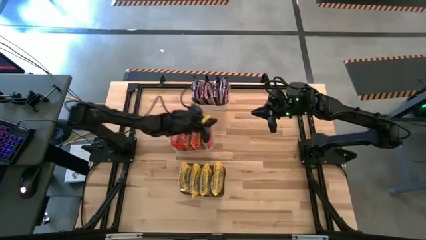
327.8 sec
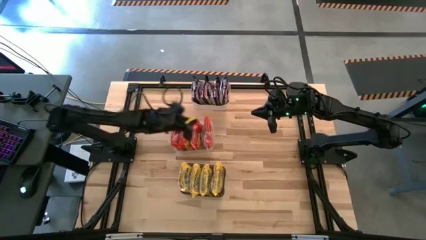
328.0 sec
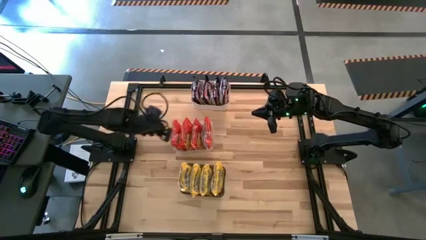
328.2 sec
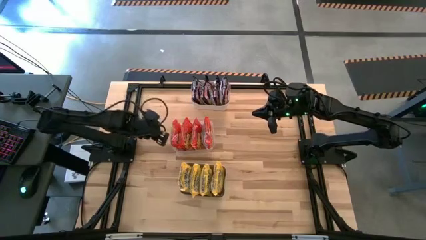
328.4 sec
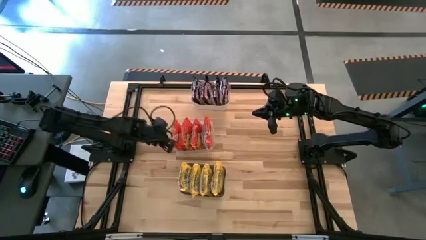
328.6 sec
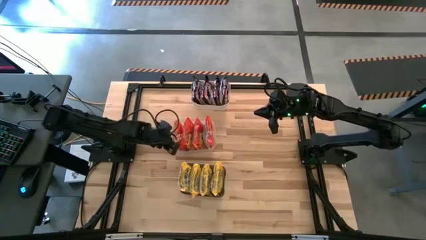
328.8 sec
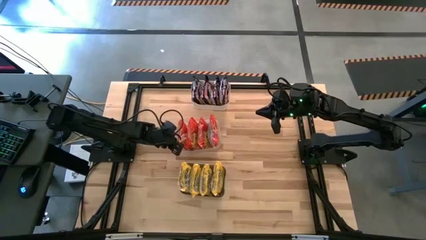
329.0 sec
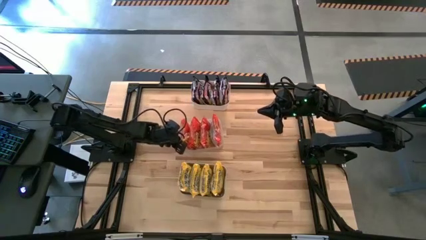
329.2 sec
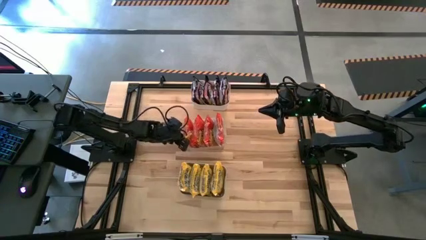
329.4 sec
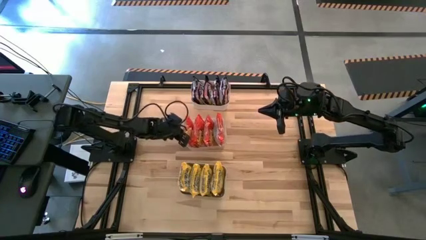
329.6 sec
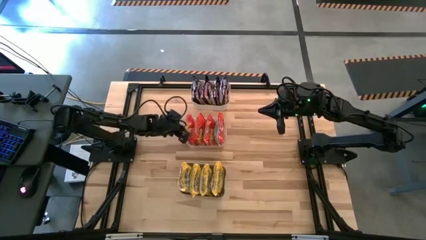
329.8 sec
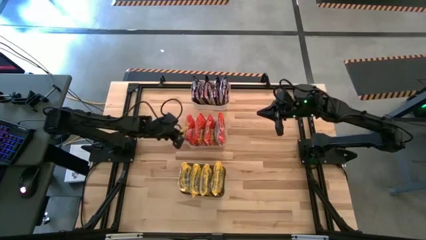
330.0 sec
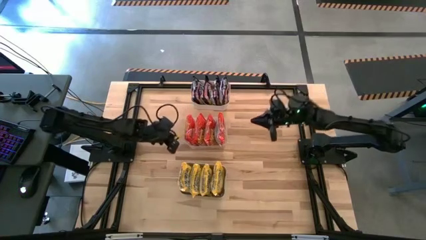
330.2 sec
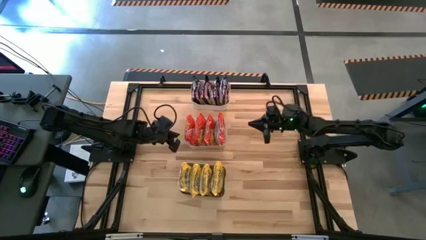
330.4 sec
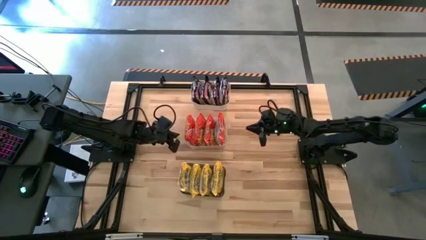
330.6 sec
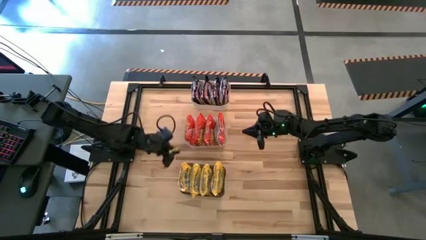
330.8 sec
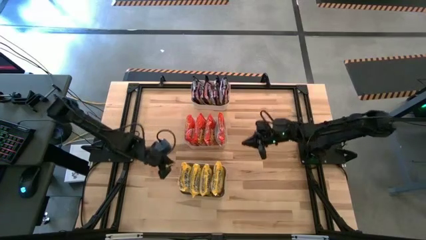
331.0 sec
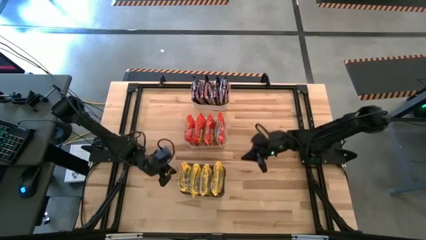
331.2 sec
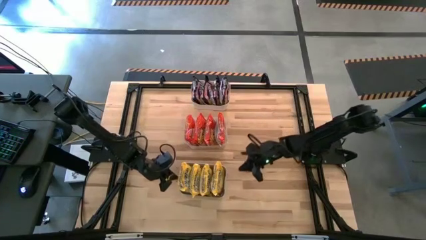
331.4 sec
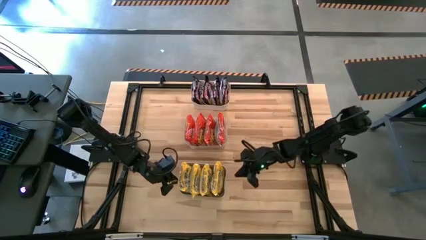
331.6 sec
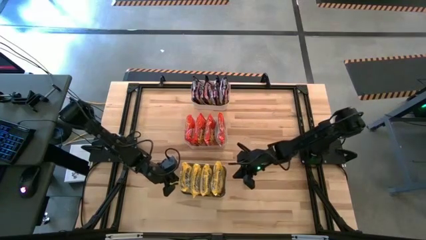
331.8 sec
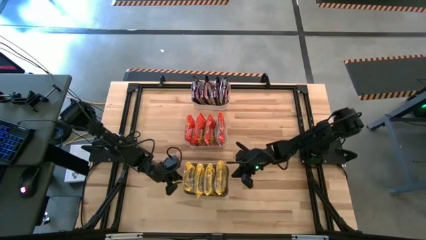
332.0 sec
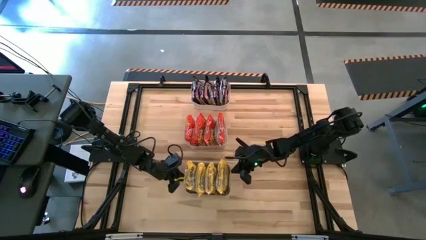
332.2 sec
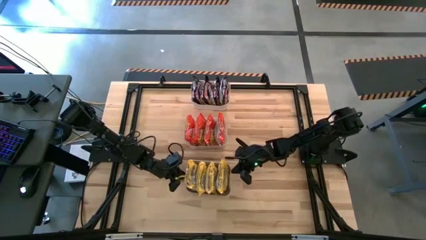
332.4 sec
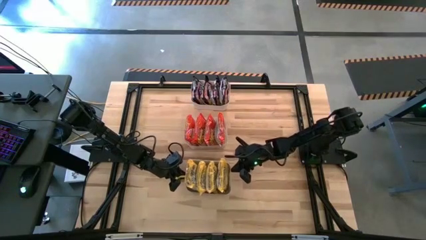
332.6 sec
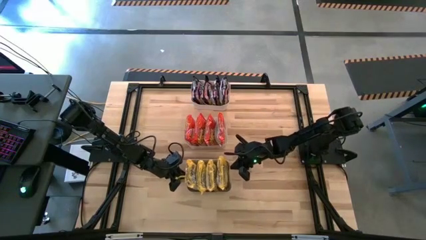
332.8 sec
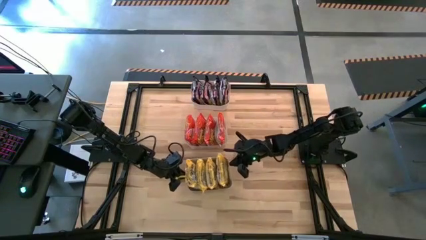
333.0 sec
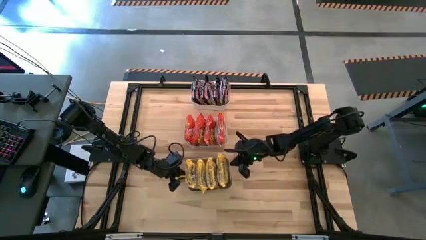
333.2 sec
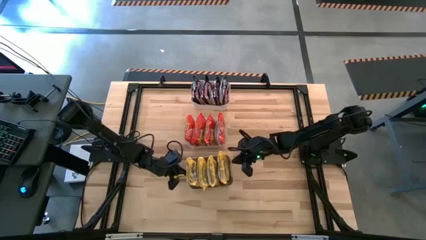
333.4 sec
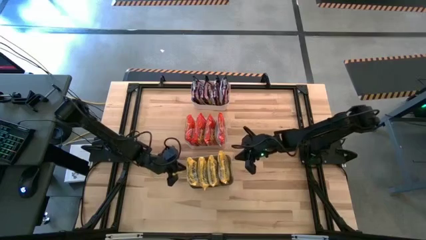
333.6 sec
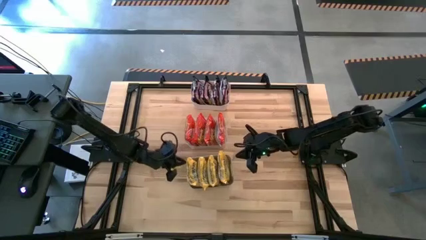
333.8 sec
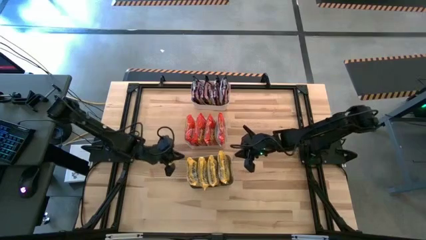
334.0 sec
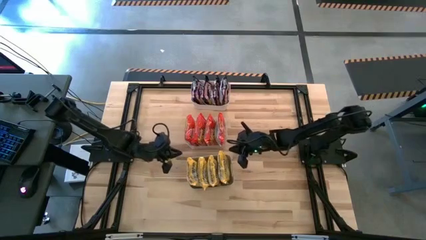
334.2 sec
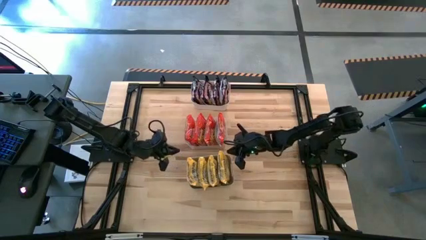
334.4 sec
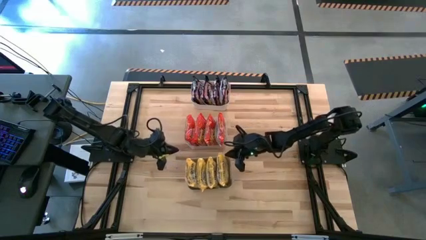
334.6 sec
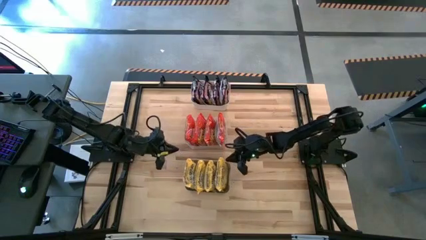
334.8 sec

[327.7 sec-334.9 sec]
Task: Sort Maruchan noodles
Adjust the bins on the table

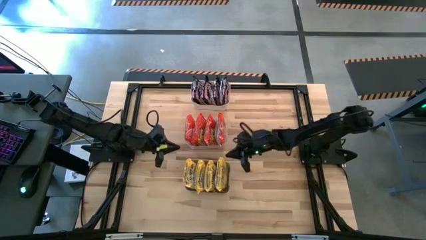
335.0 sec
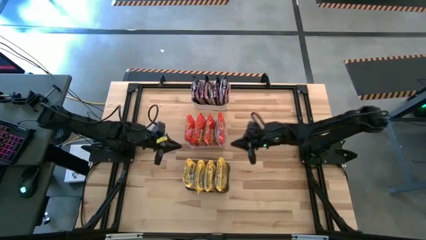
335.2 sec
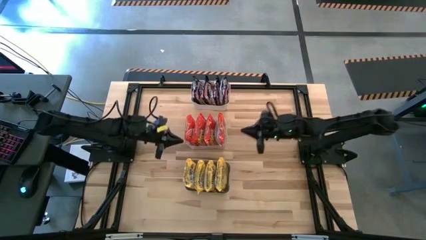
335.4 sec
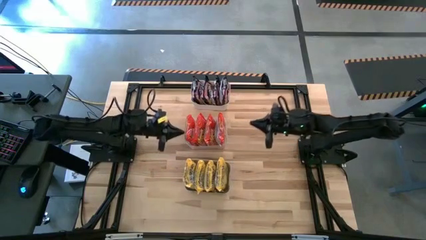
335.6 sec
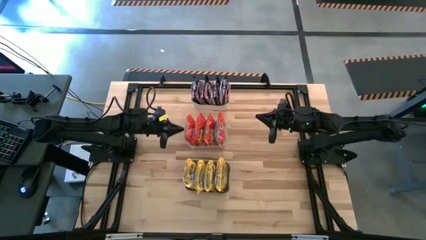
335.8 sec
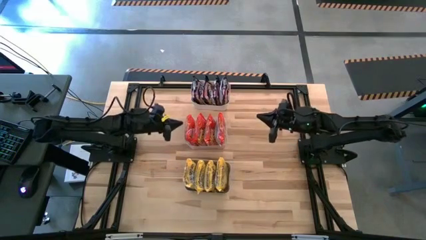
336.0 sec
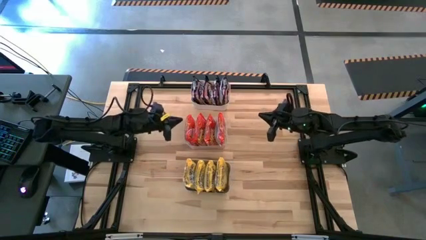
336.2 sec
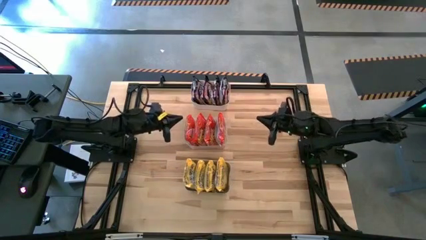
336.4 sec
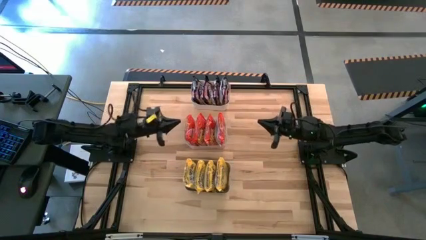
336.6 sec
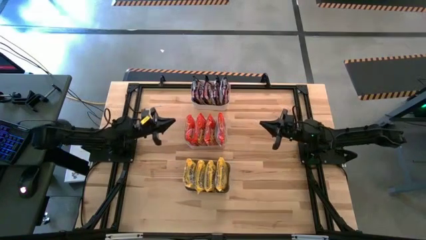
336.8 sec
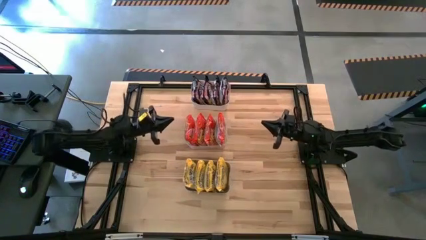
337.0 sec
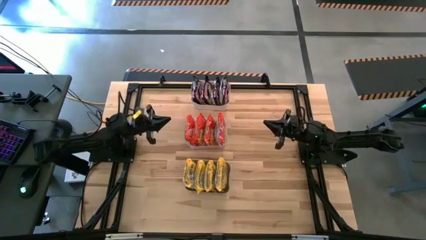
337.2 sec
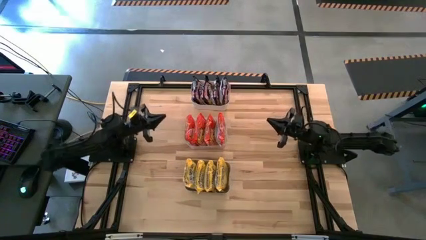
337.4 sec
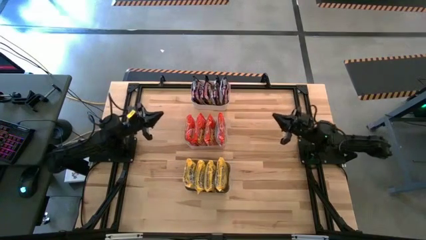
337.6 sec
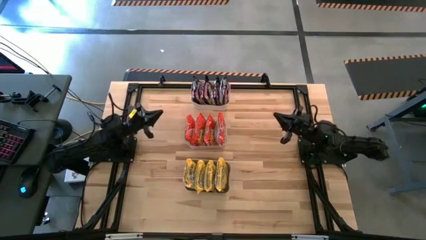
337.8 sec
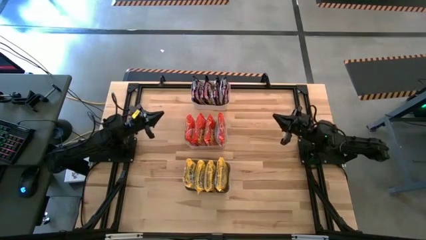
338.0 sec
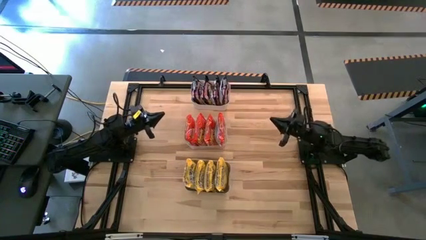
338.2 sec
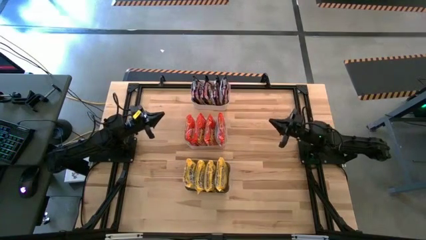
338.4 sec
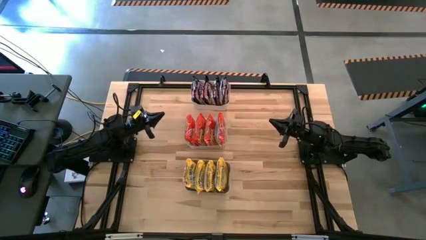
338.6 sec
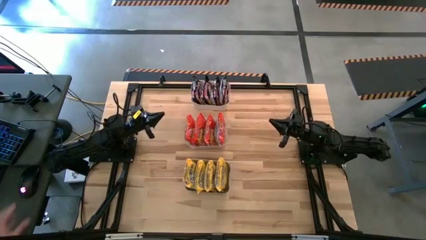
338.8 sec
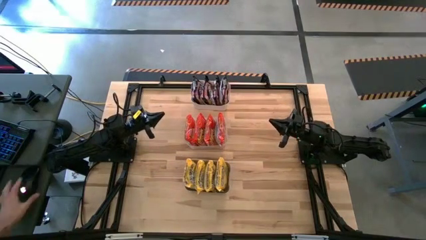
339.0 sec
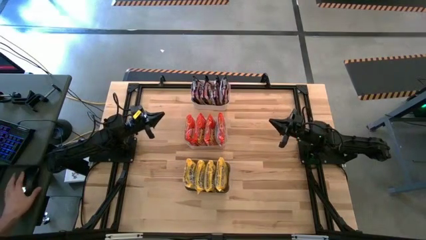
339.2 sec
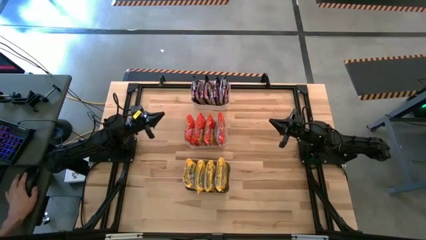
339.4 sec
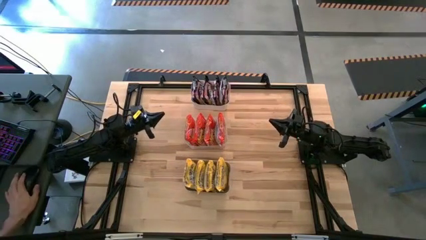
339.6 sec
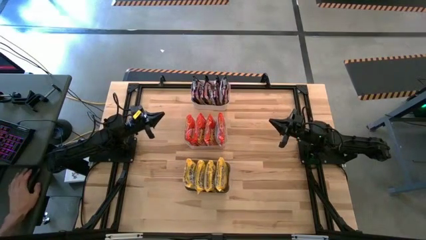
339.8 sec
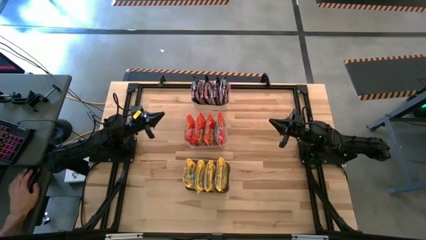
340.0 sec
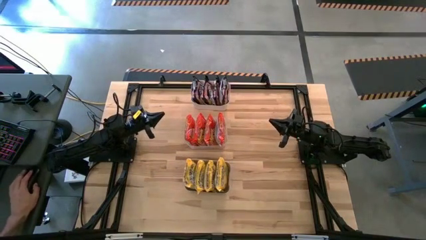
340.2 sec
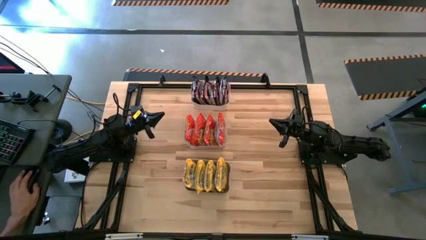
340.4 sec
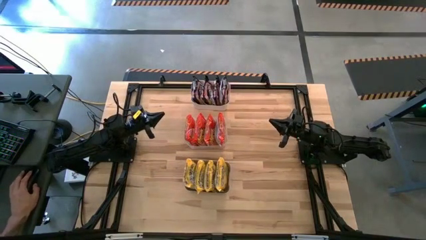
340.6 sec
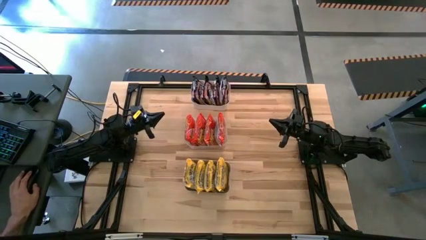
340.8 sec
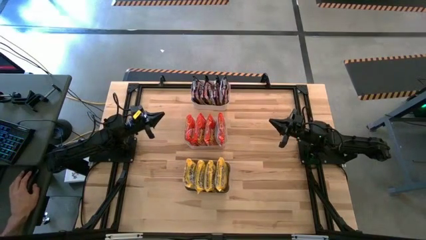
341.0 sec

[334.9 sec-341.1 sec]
Return to Home Position

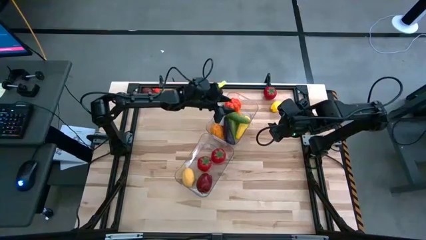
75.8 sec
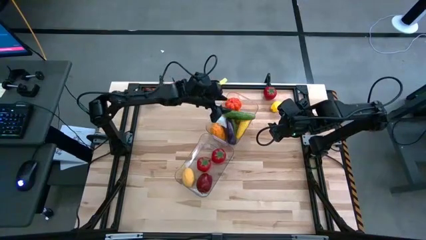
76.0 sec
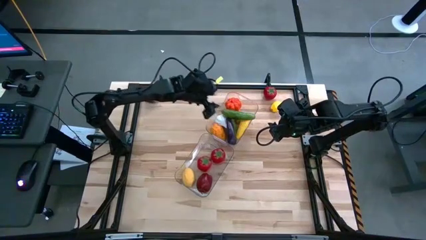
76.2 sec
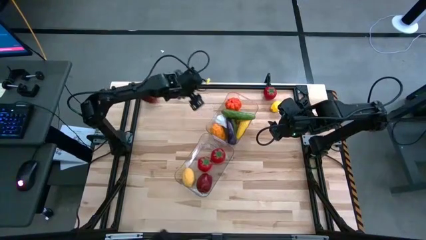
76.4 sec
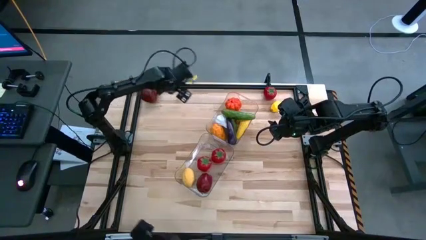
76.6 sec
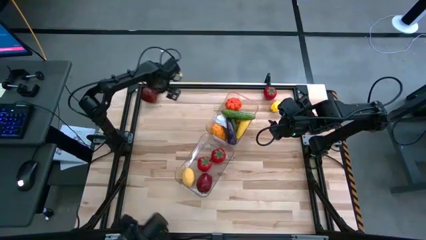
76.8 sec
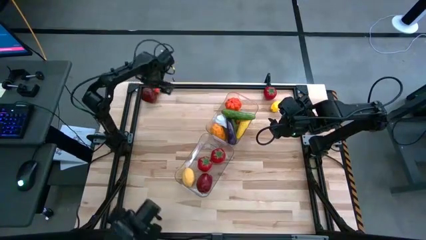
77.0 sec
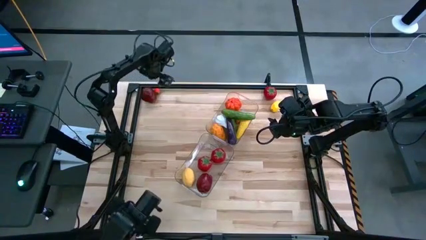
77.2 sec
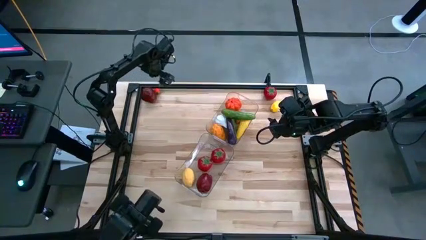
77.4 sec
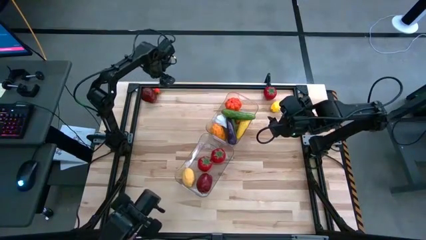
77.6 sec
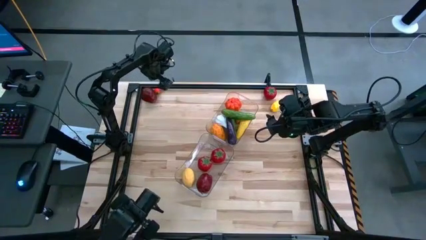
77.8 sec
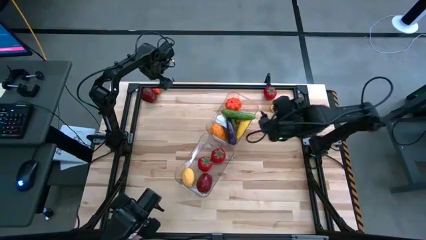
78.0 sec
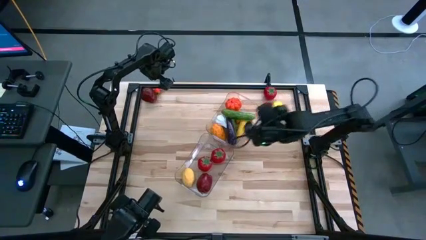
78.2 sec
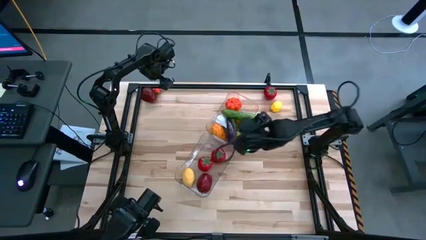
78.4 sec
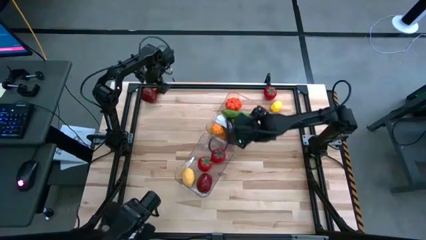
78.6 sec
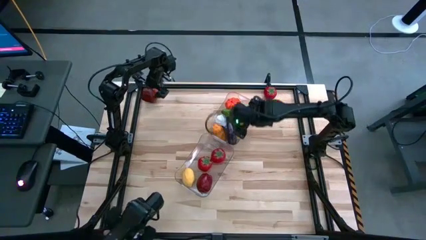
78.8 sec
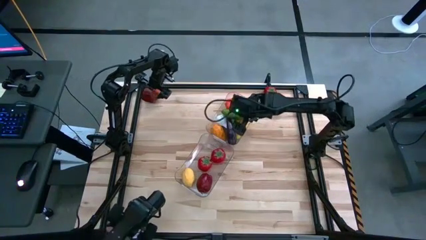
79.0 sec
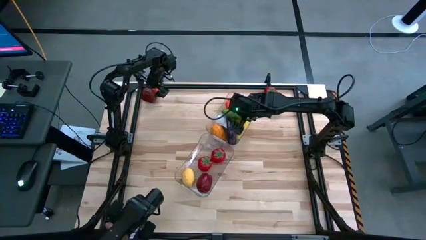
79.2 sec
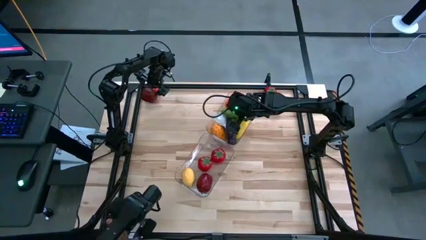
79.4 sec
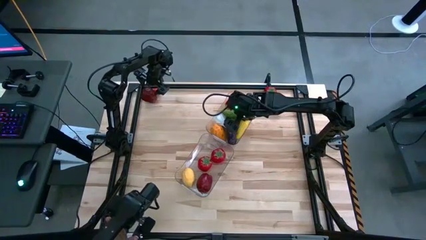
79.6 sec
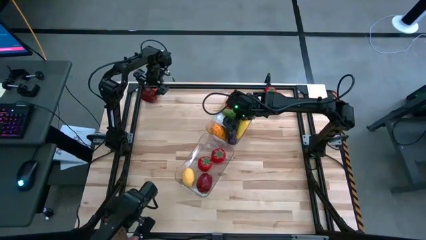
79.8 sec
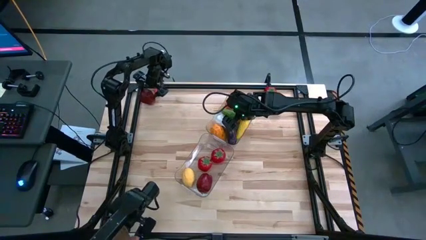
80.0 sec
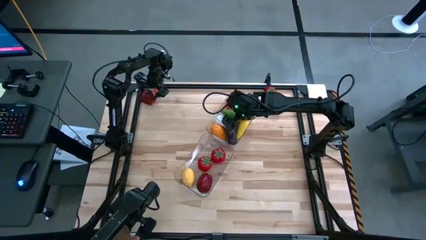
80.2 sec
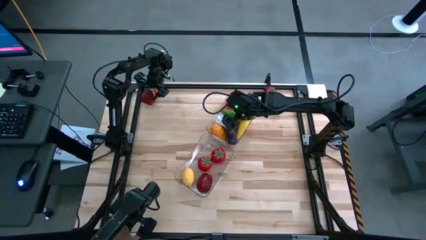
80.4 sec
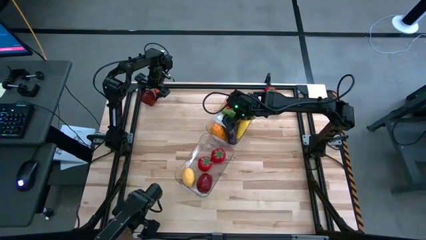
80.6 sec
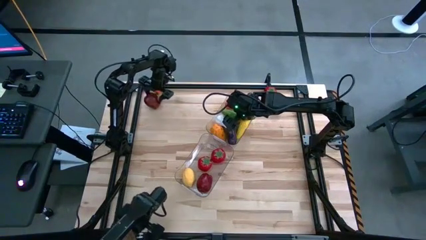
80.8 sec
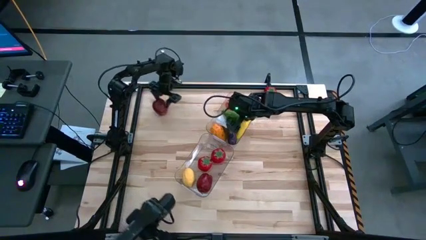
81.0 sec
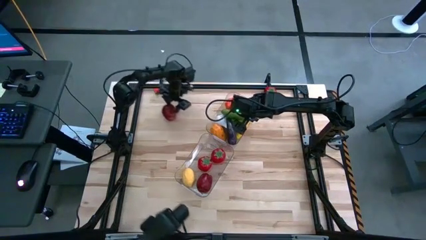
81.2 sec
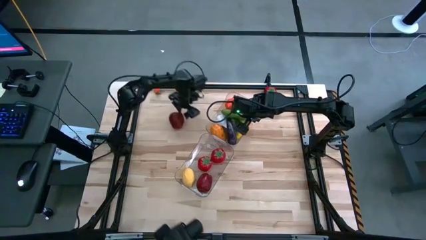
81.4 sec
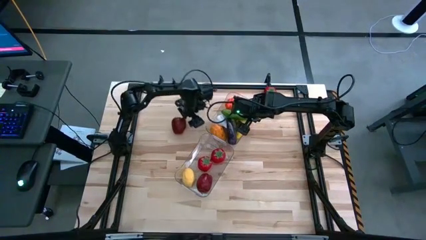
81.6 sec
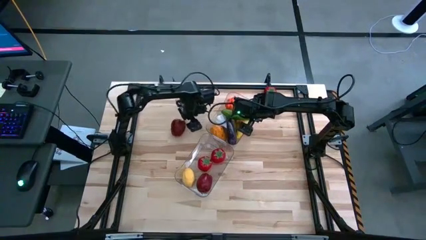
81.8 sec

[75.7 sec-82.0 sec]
Task: Sort produce into baskets
Put the red apple into the bottom transparent bin
